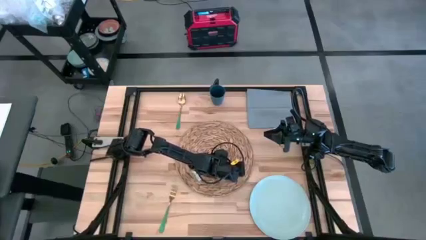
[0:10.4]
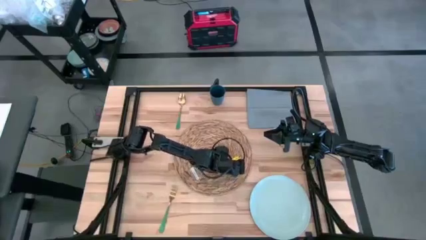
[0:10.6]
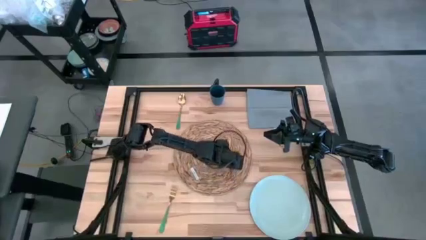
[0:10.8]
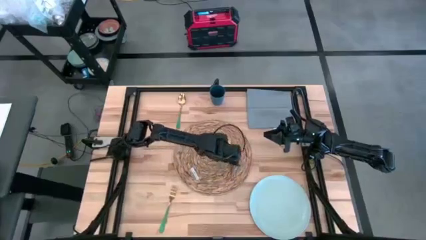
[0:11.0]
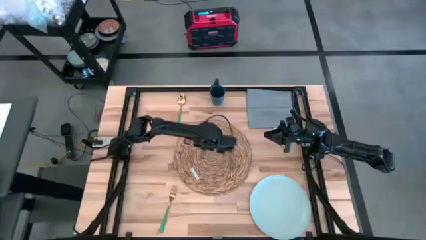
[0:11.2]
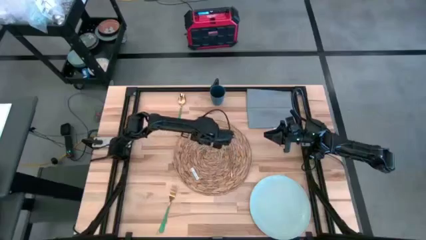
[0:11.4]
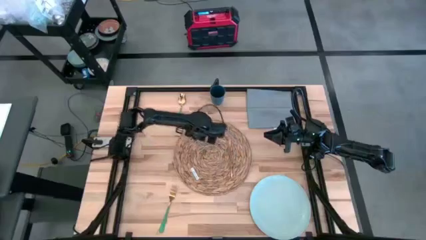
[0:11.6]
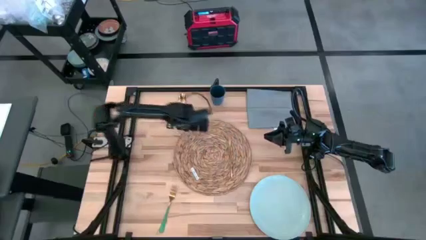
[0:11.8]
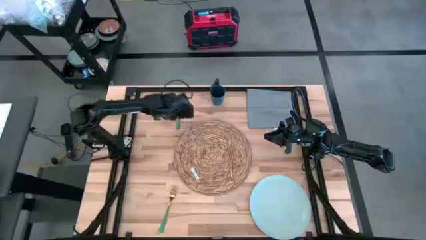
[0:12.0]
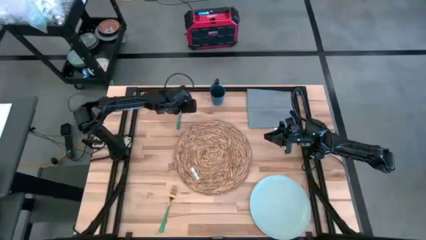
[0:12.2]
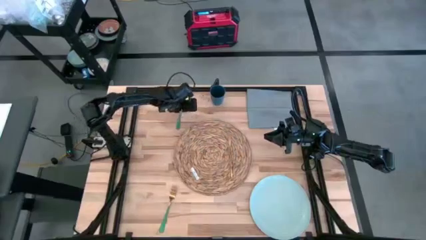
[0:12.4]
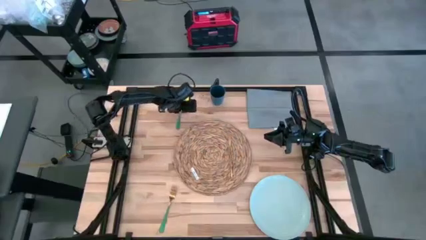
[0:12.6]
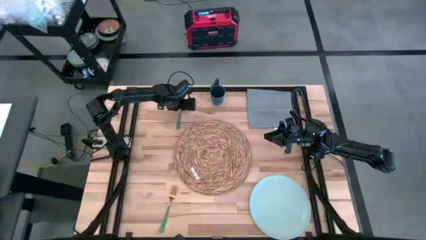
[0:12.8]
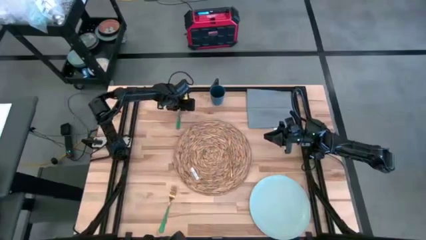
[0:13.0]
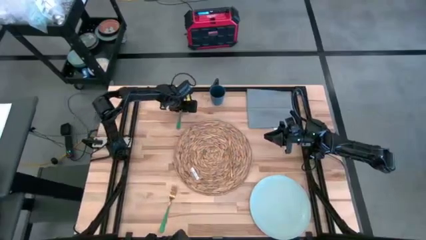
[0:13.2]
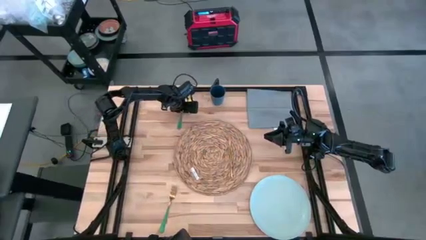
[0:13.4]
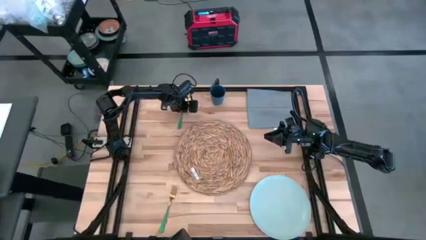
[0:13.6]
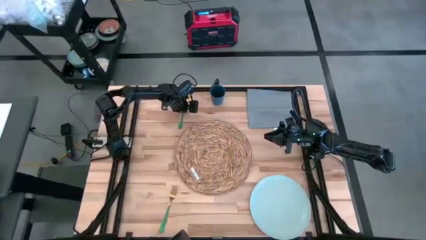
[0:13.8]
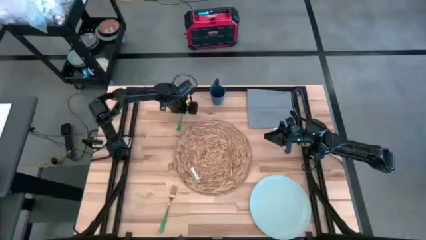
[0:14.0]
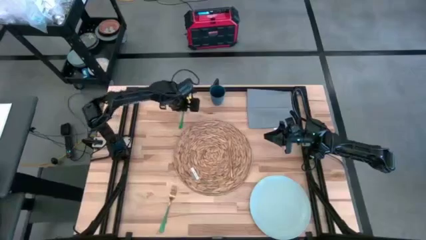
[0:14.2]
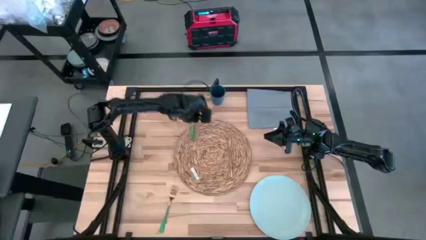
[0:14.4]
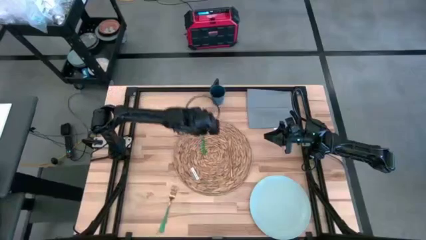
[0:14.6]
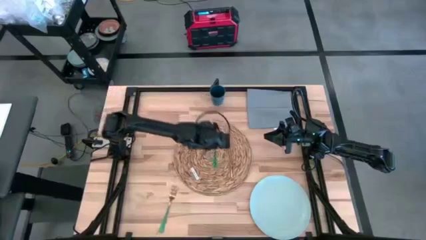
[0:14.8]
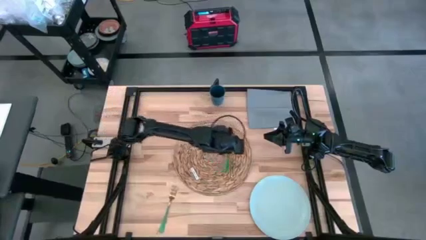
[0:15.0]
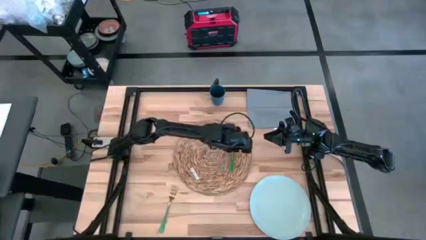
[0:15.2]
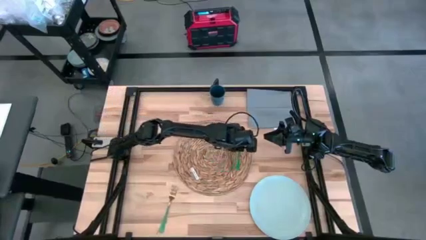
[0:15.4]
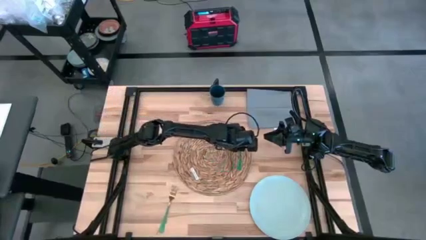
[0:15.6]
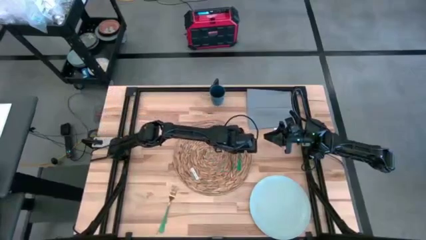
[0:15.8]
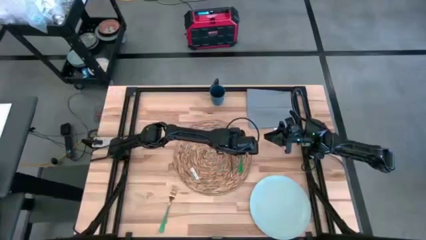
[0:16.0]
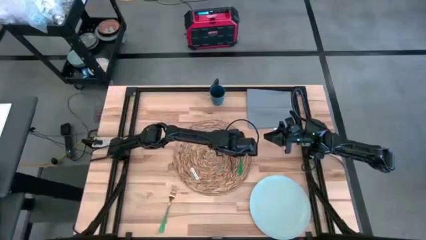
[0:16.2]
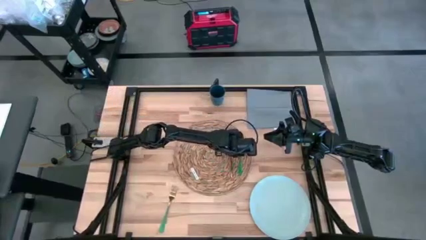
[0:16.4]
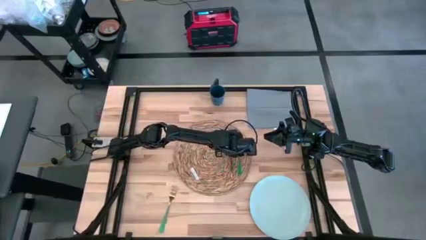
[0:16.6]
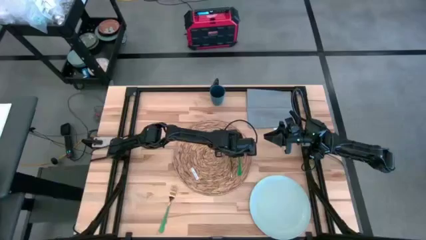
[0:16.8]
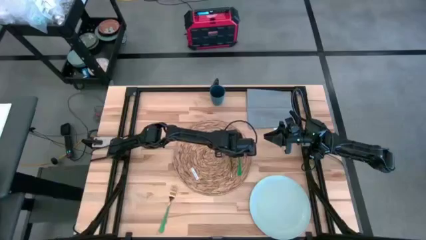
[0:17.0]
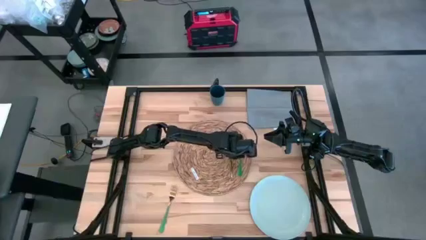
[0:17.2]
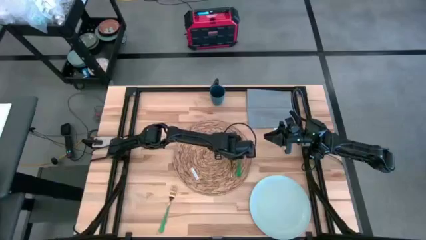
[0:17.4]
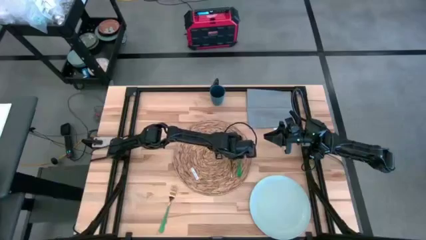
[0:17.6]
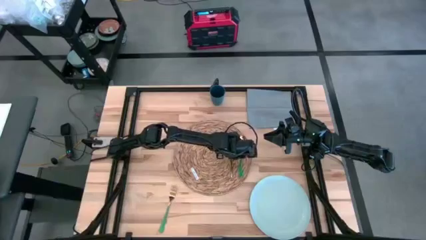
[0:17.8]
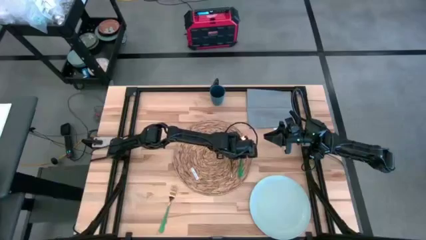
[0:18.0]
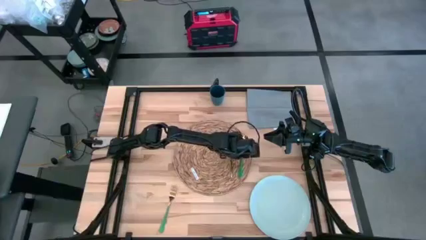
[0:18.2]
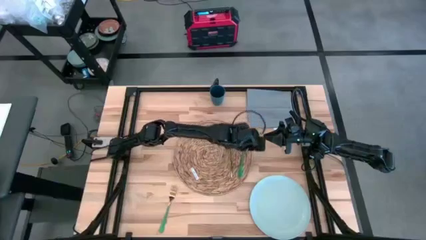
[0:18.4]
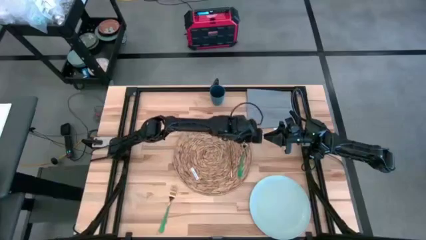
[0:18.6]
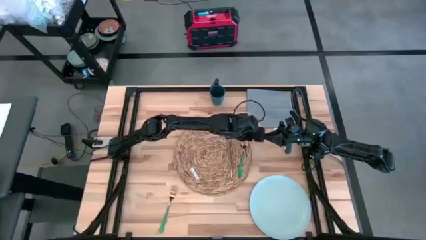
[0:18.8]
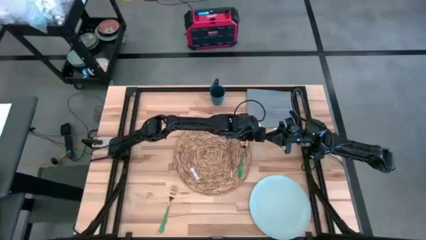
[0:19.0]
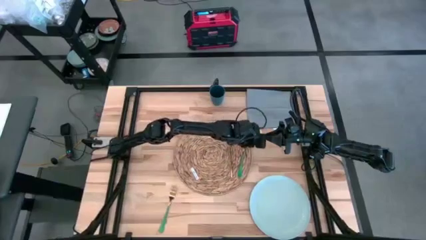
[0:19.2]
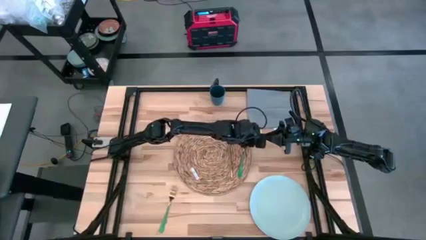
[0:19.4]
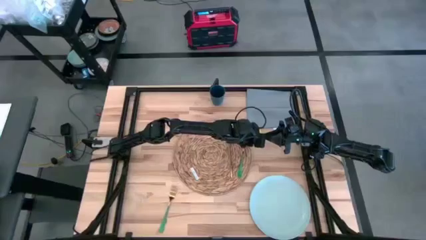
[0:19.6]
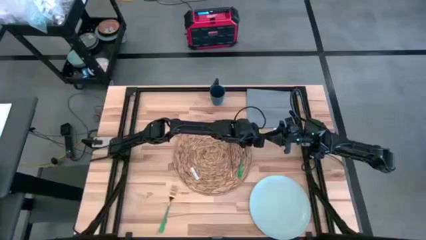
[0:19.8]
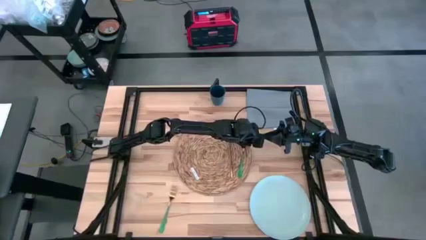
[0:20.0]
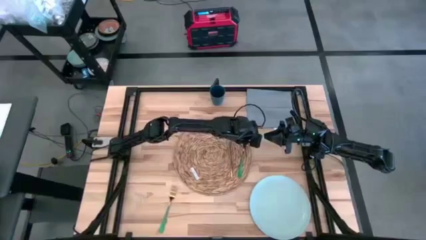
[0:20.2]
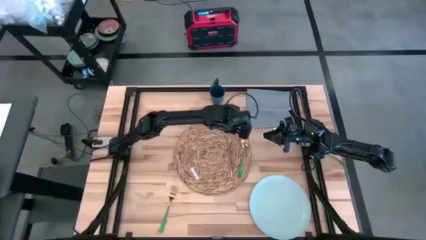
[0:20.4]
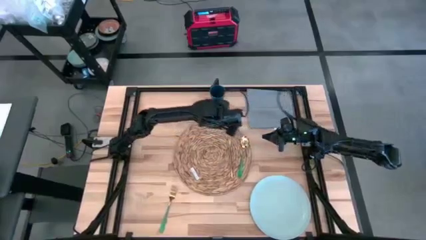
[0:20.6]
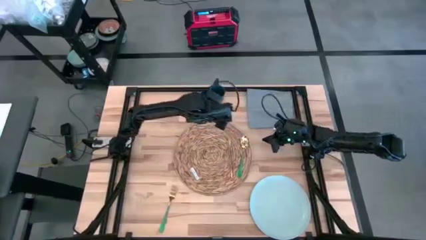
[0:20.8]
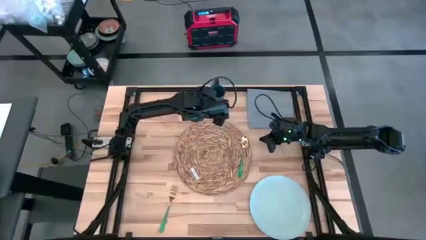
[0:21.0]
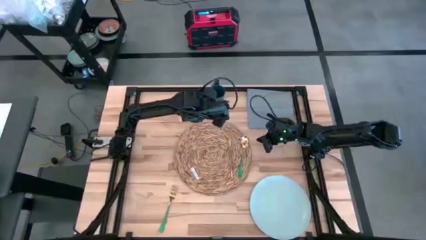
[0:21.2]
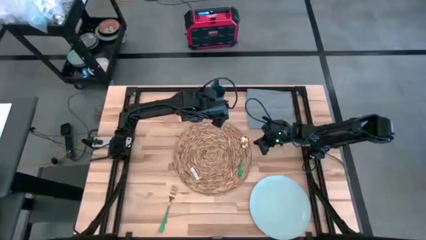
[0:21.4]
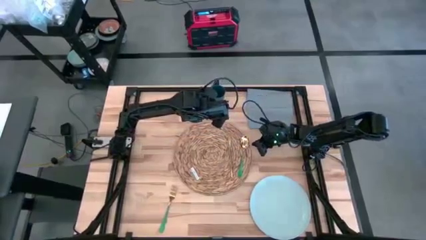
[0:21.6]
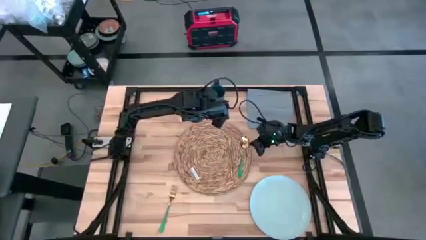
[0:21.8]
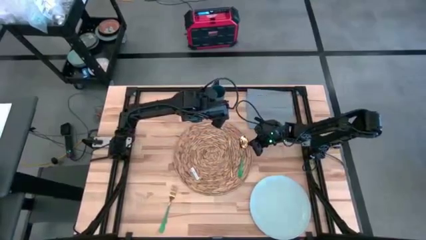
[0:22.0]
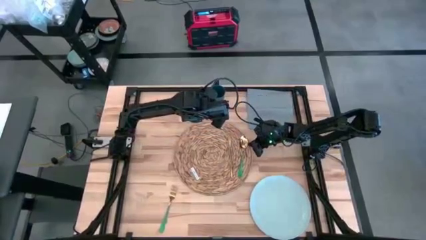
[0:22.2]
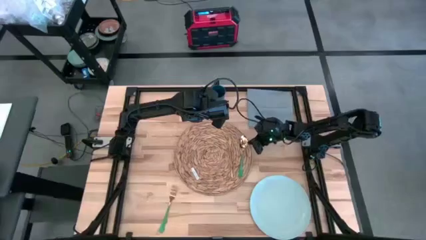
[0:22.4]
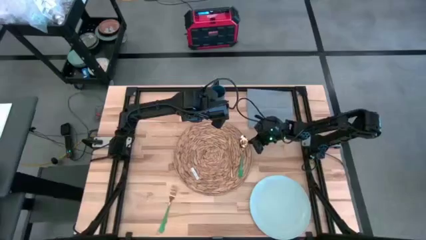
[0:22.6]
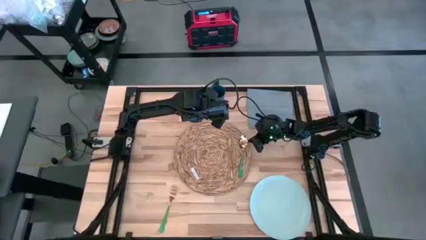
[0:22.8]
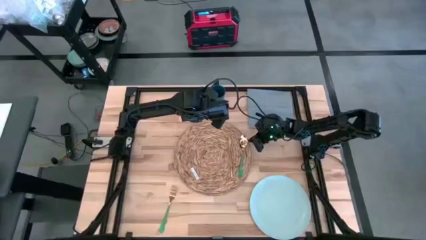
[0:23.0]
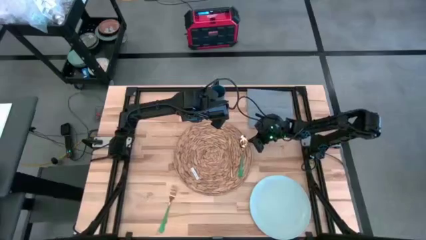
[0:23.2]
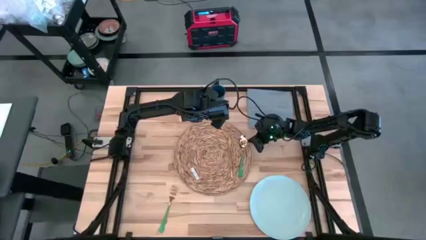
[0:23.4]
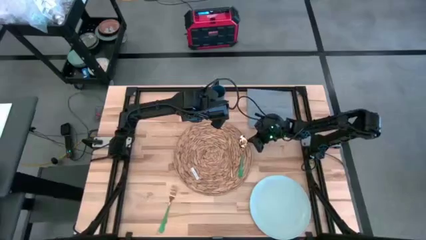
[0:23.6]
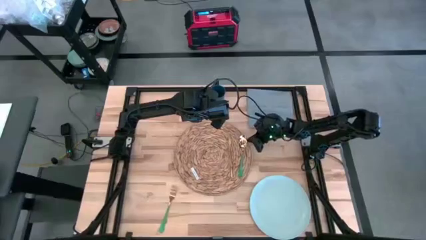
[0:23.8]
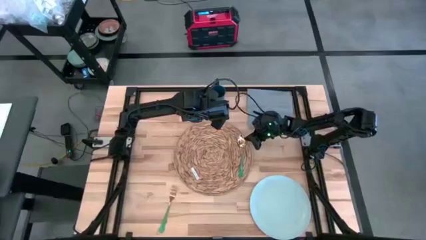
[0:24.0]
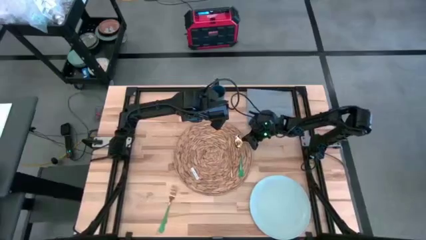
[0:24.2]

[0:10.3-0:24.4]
Task: Set table place
Put the green spoon on the brown tablemat to the right of the gold table knife
